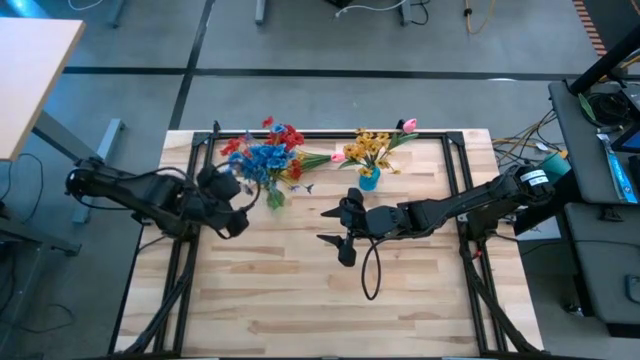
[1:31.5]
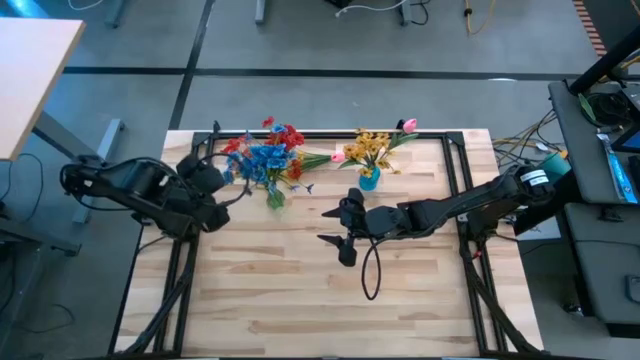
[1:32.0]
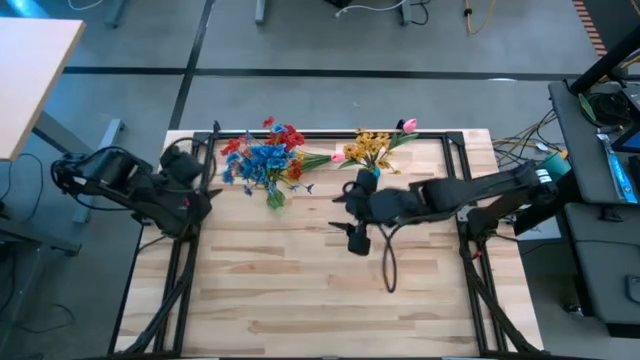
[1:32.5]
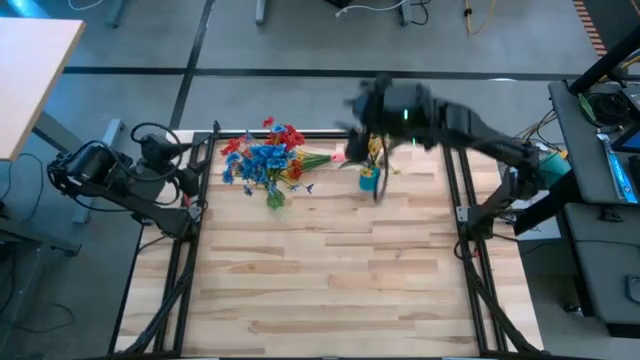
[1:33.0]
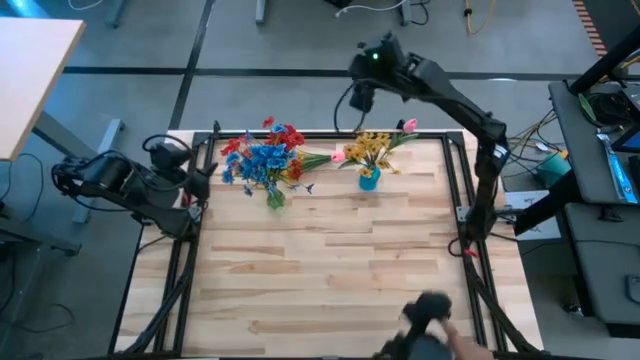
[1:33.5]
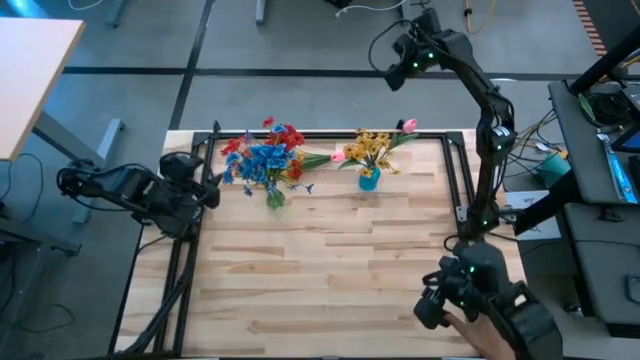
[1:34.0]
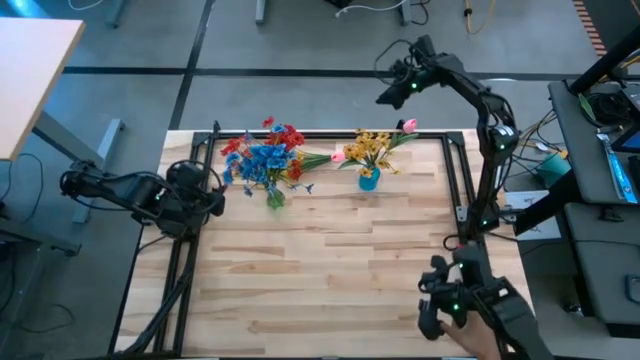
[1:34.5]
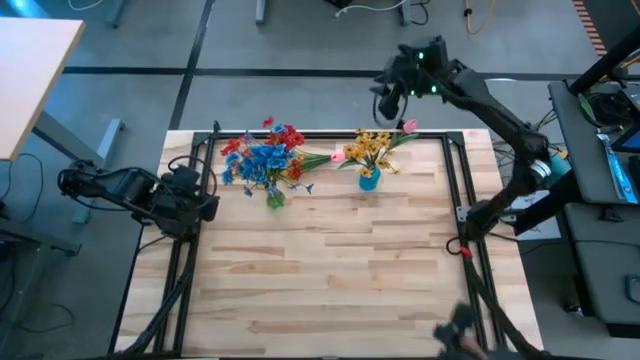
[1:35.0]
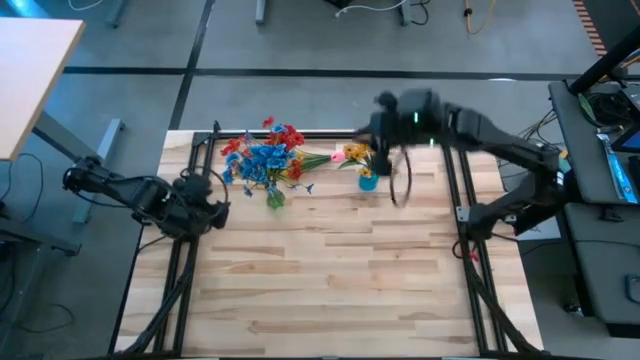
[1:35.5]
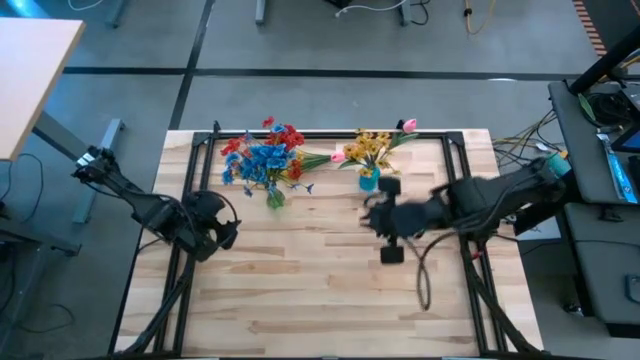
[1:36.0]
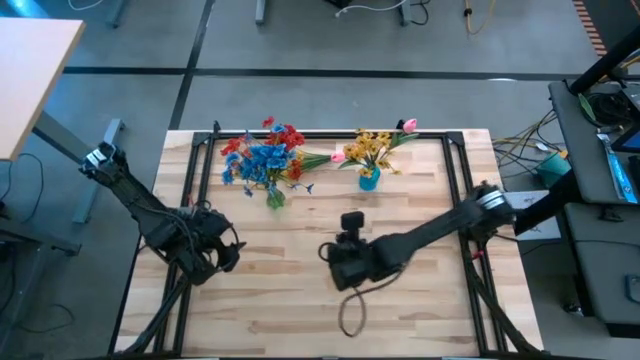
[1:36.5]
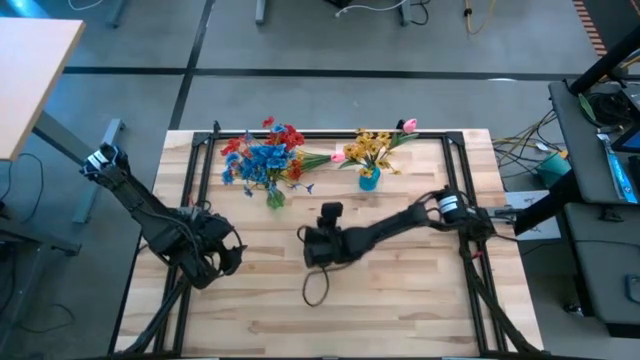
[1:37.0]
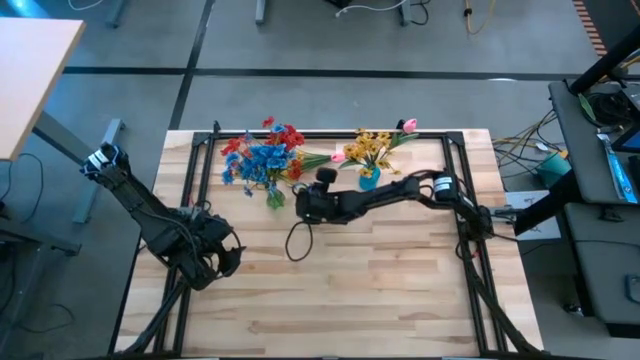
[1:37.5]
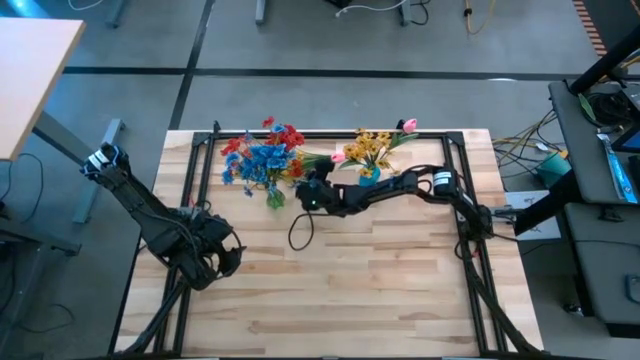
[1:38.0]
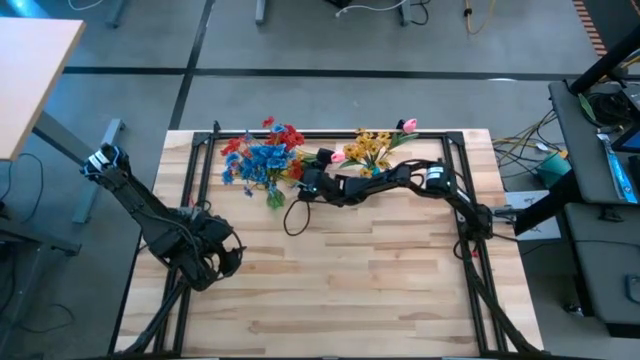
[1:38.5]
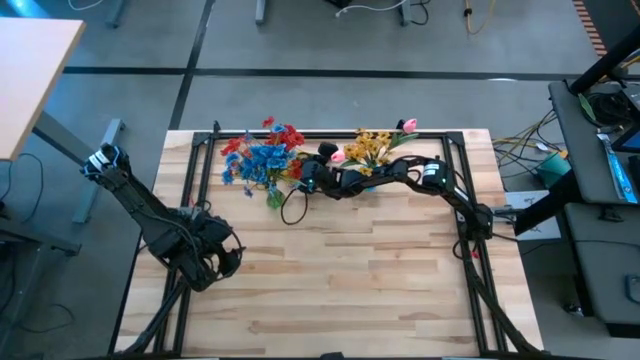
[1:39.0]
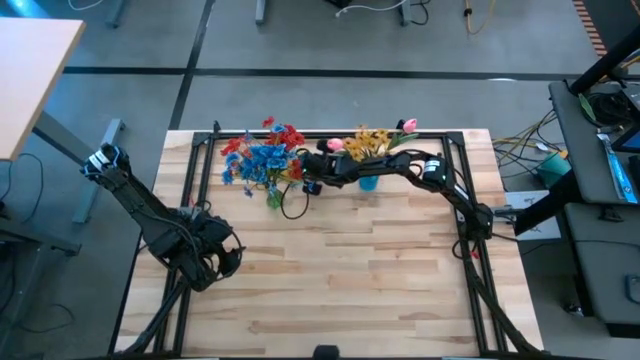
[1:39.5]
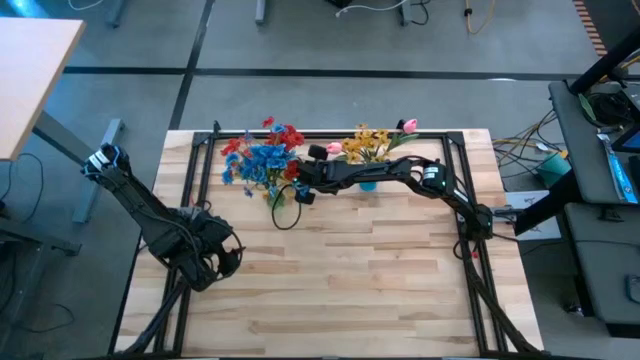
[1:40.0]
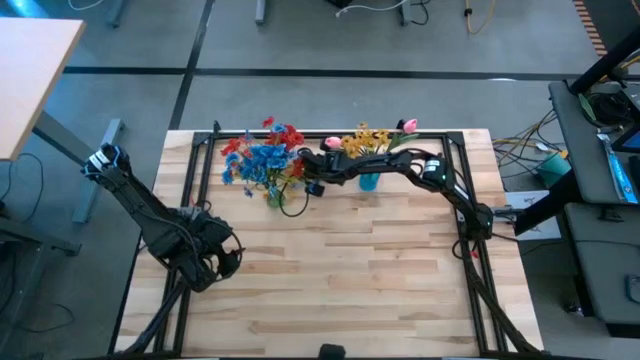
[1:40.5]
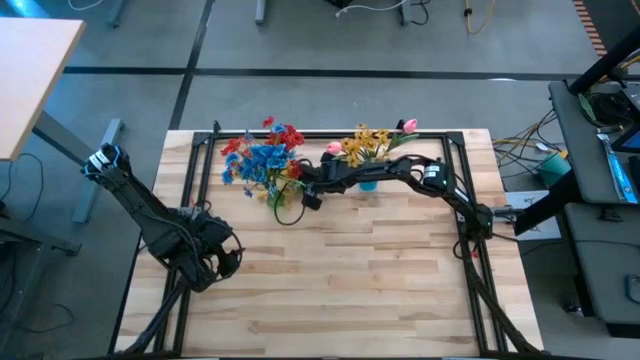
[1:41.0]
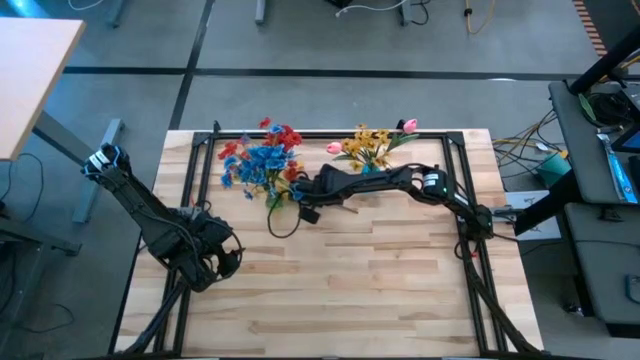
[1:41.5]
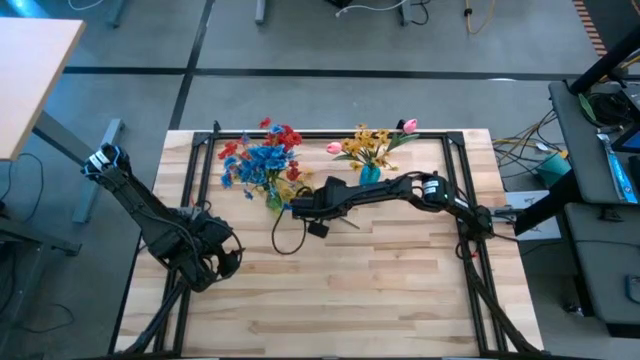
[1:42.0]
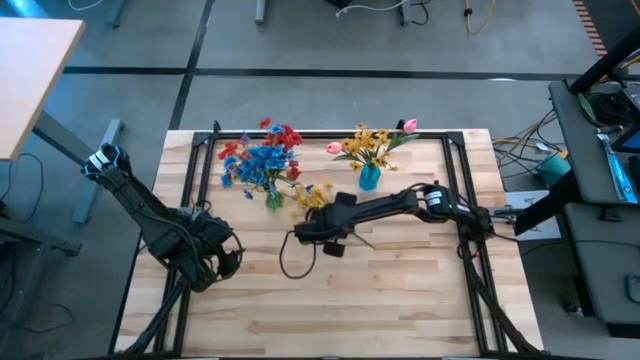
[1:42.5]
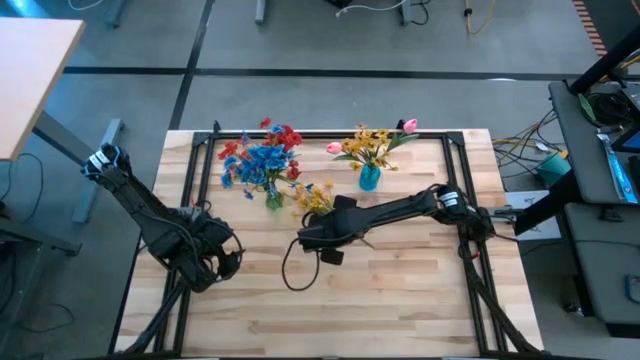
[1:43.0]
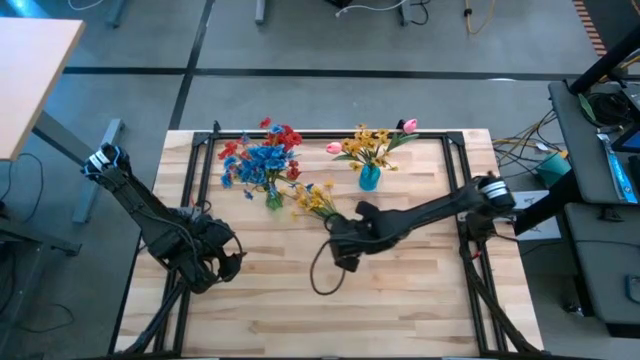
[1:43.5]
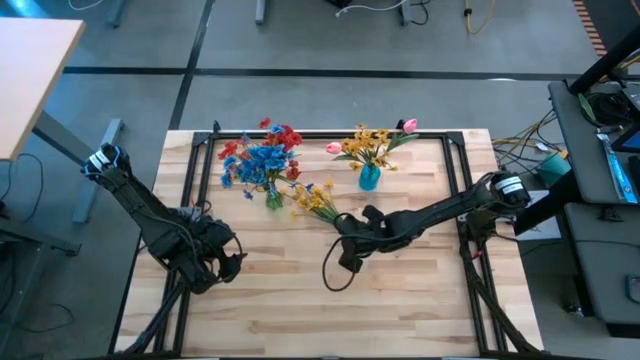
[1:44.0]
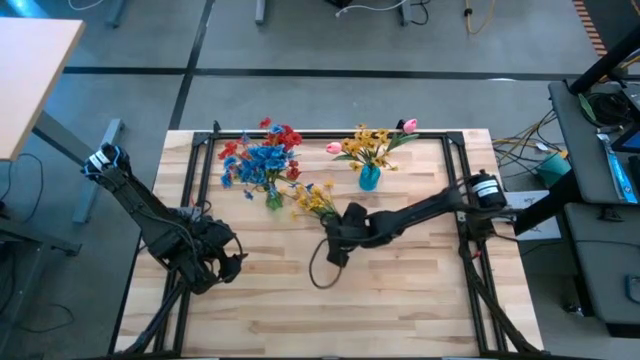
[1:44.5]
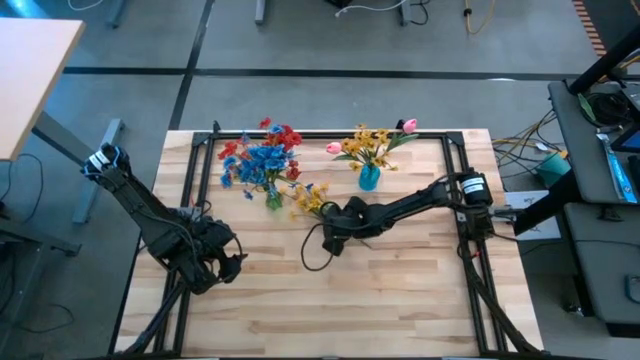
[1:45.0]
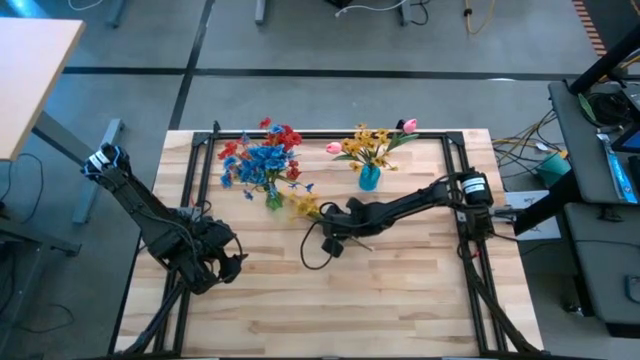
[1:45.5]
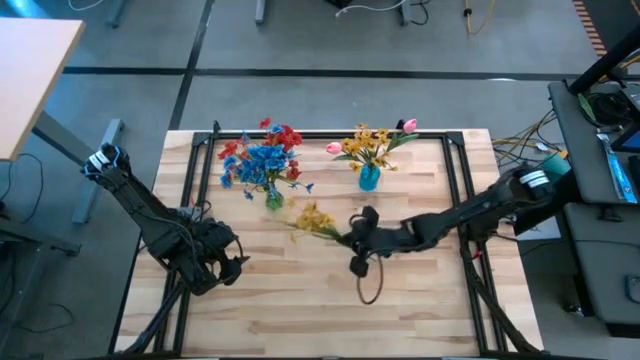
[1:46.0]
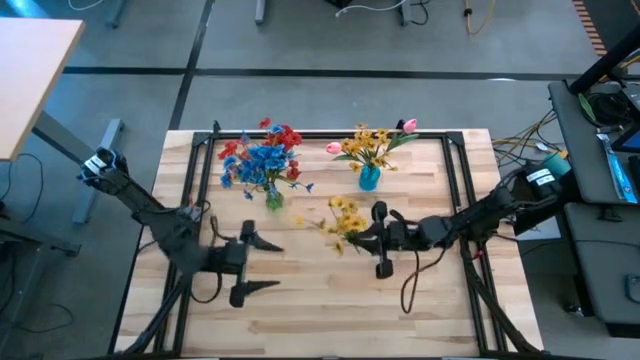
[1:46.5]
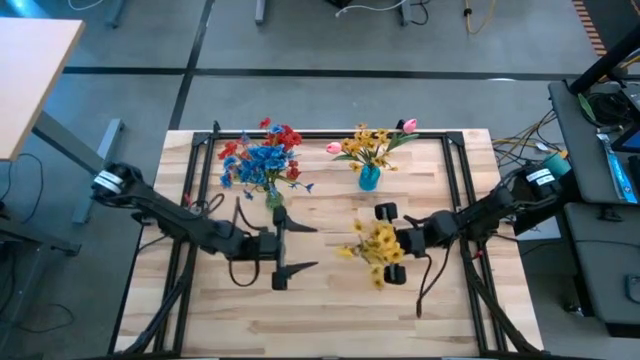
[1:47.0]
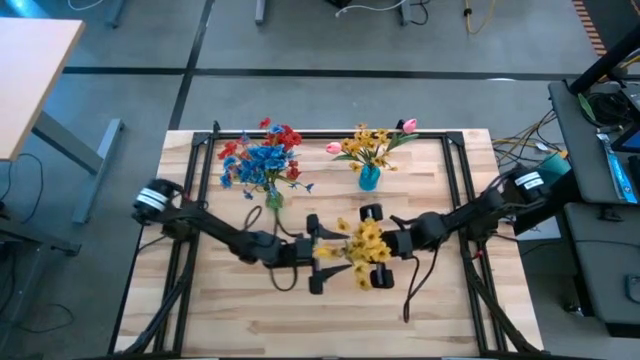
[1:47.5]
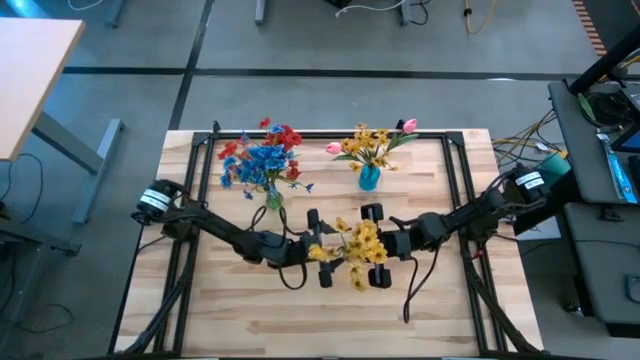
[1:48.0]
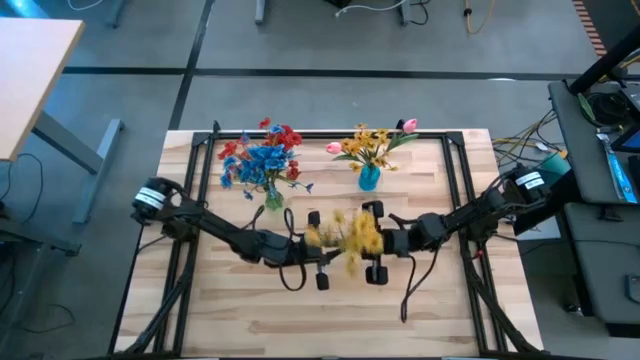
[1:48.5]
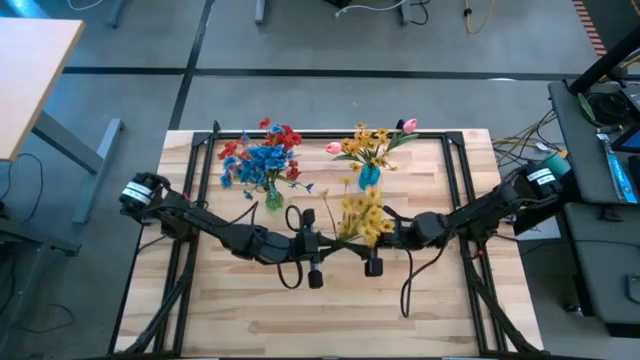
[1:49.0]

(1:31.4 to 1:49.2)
Task: Sort flowers into vase by color
Put the yellow flowers into the blue vase

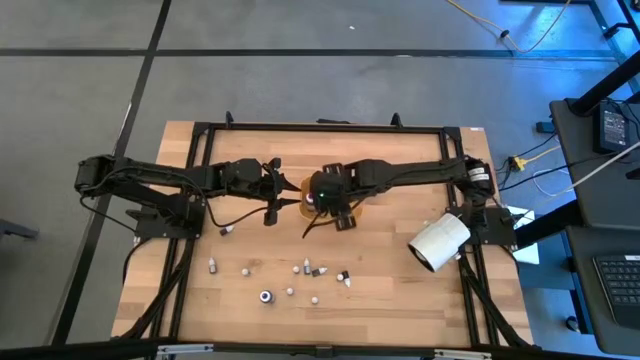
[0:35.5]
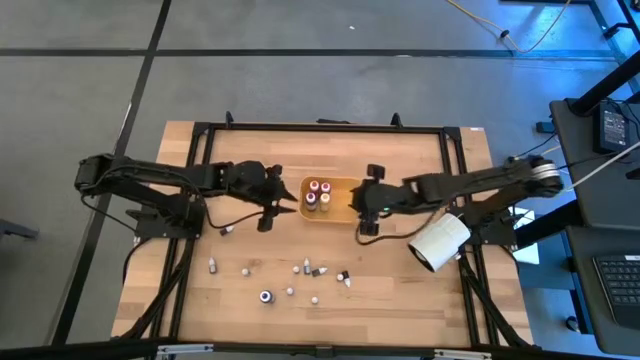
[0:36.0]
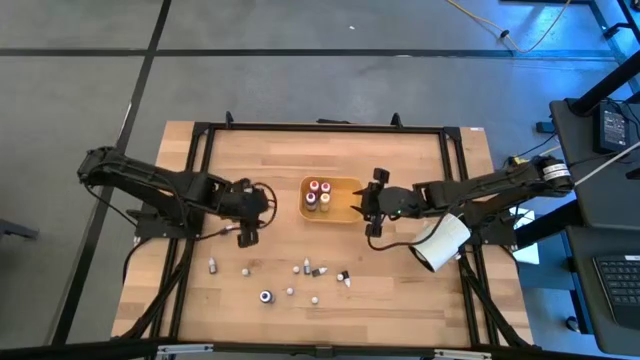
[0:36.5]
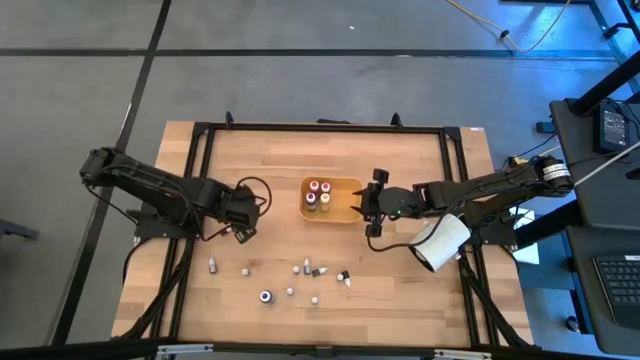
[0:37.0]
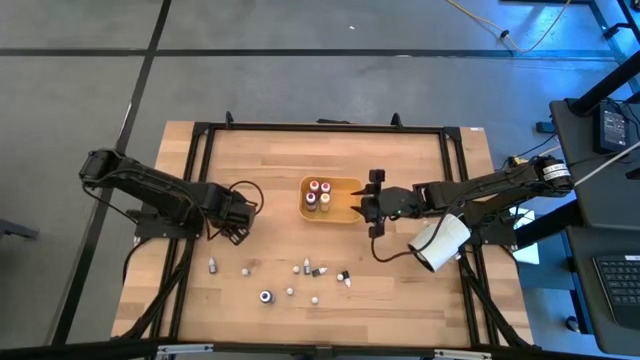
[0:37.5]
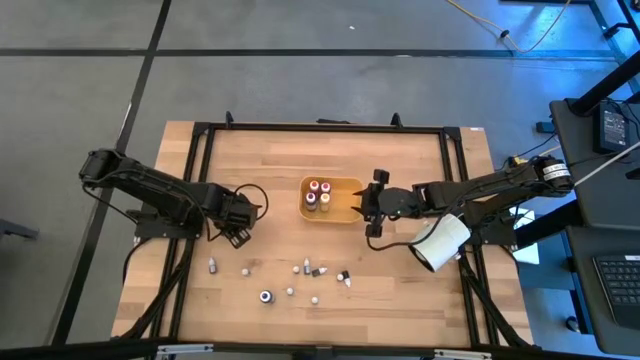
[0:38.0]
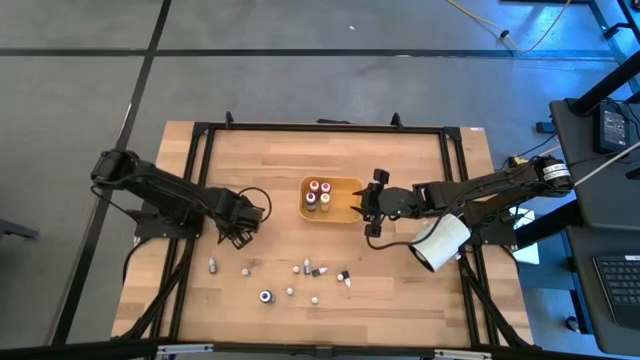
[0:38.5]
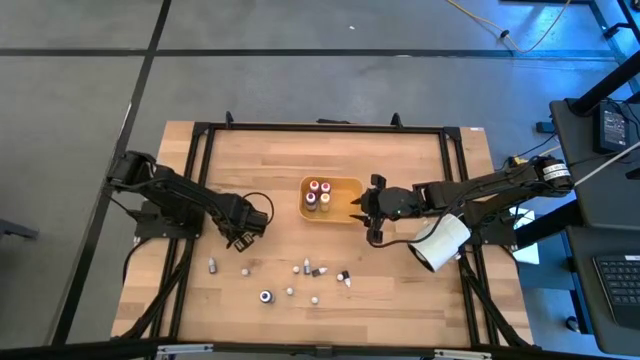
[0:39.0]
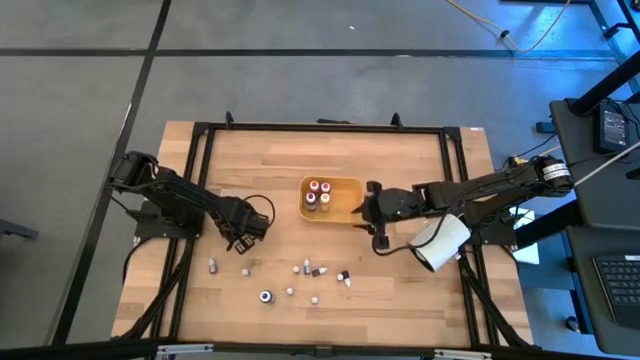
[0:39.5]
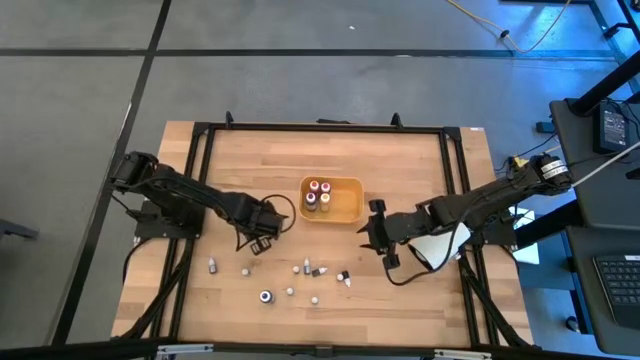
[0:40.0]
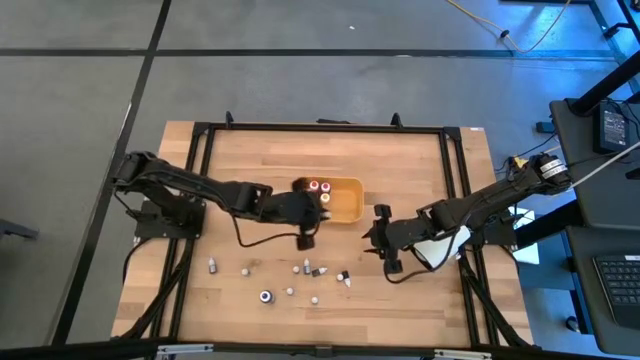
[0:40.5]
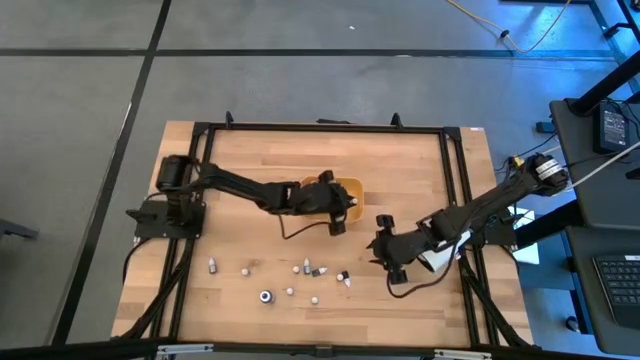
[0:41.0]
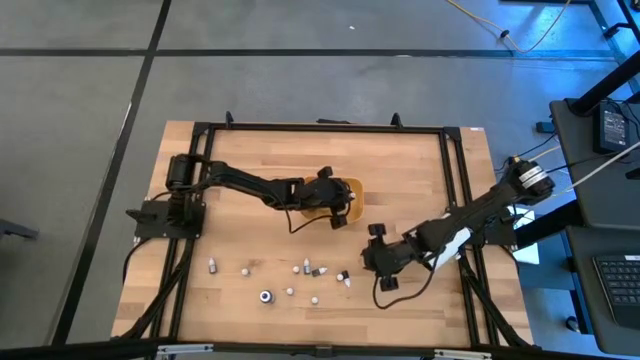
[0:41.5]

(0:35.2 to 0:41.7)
Task: Pick & Place food coloring
Put the small purple food coloring bottle into the yellow bin
